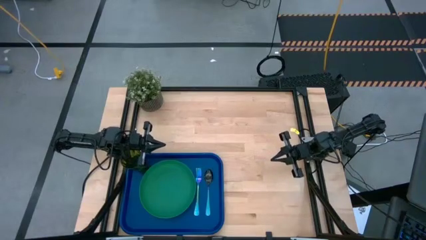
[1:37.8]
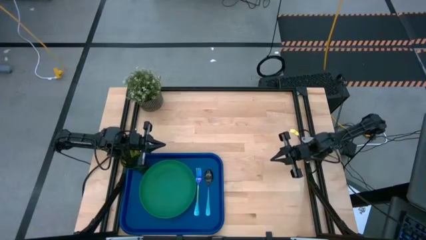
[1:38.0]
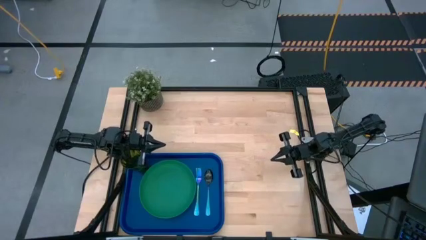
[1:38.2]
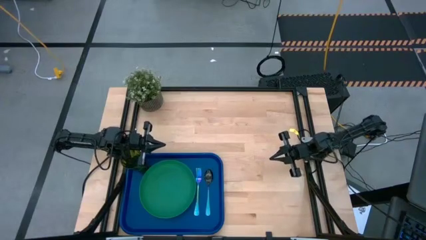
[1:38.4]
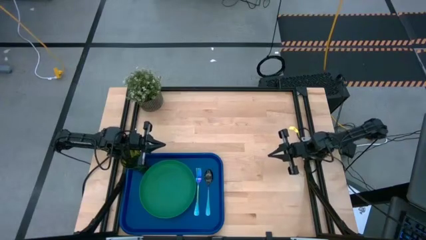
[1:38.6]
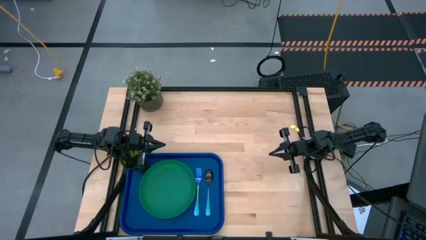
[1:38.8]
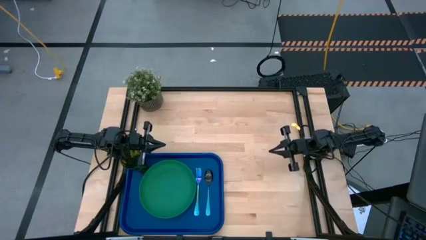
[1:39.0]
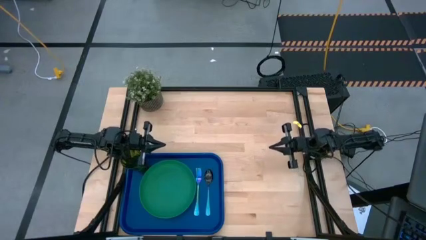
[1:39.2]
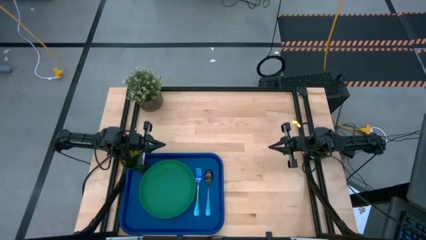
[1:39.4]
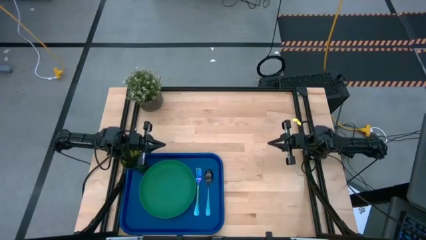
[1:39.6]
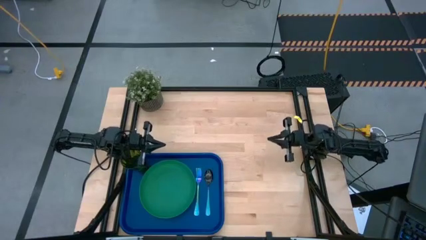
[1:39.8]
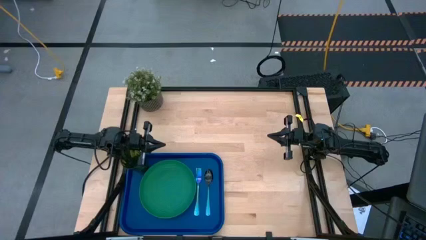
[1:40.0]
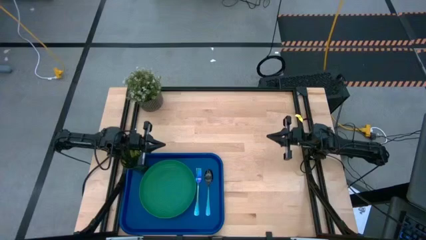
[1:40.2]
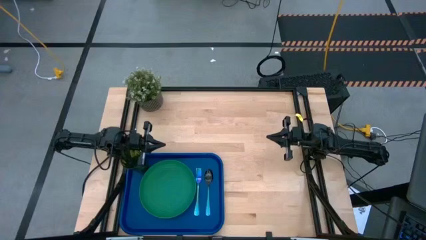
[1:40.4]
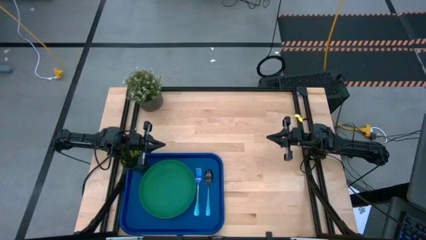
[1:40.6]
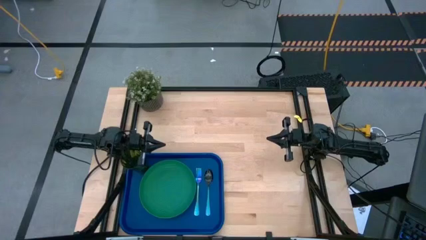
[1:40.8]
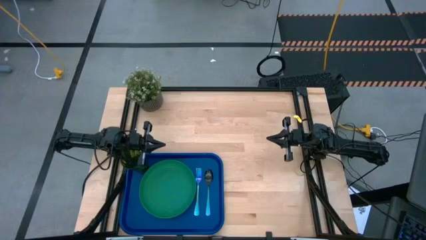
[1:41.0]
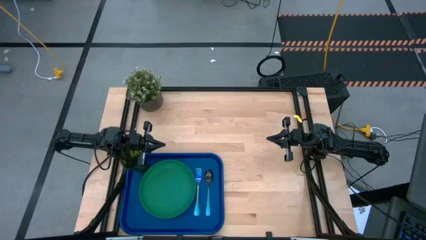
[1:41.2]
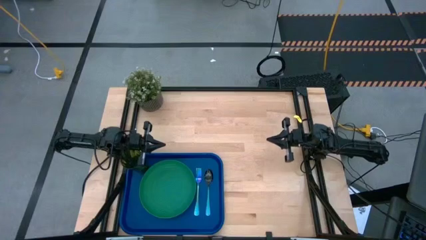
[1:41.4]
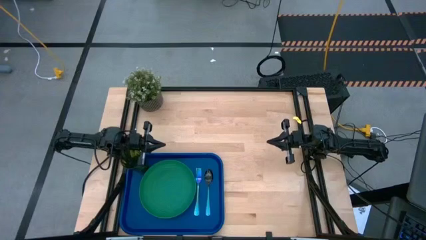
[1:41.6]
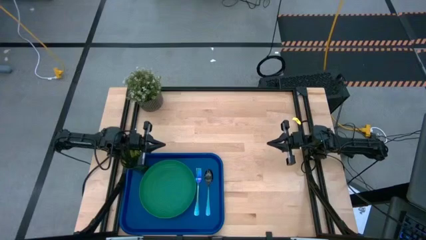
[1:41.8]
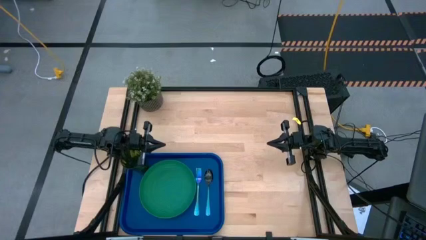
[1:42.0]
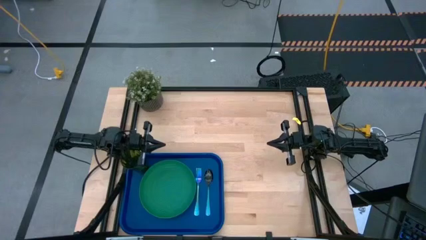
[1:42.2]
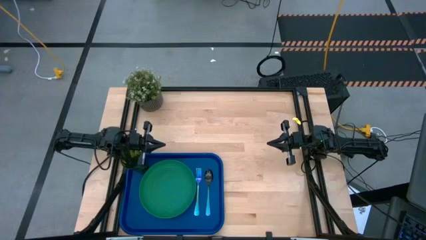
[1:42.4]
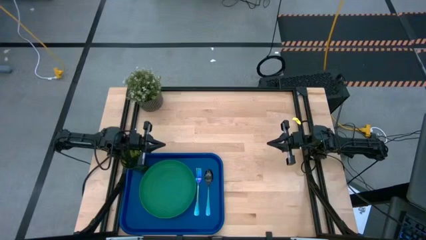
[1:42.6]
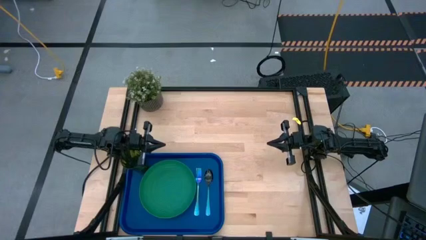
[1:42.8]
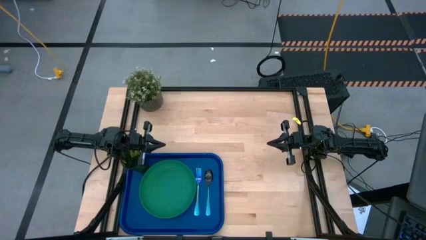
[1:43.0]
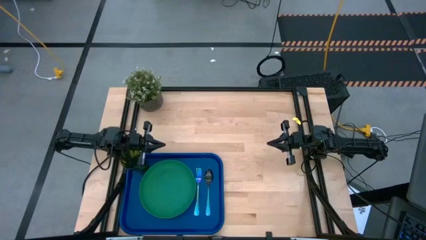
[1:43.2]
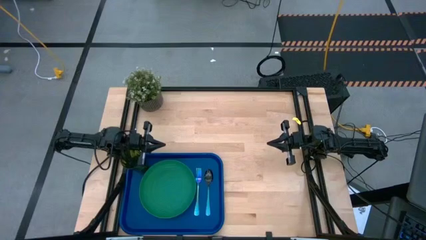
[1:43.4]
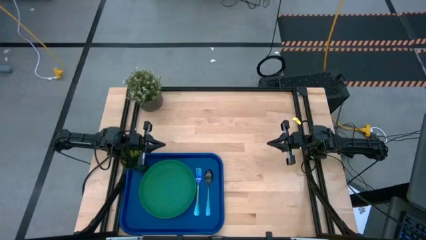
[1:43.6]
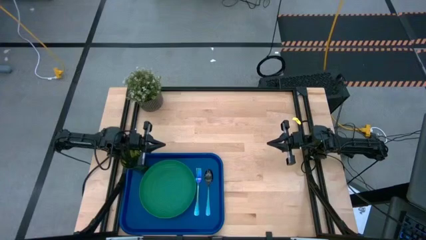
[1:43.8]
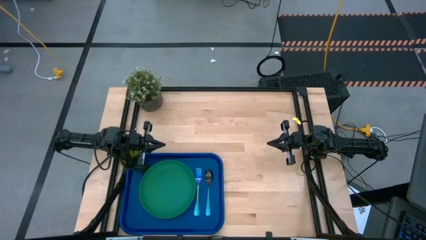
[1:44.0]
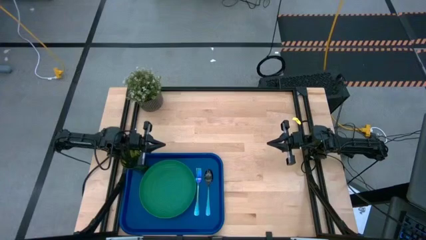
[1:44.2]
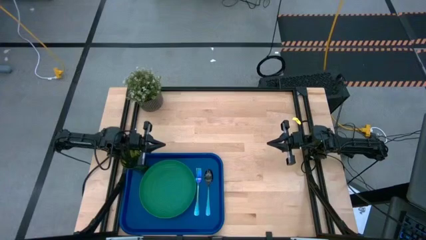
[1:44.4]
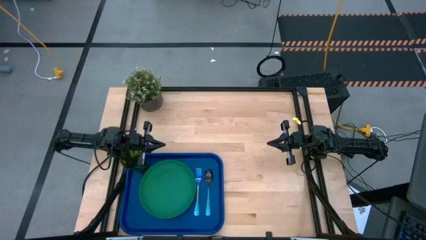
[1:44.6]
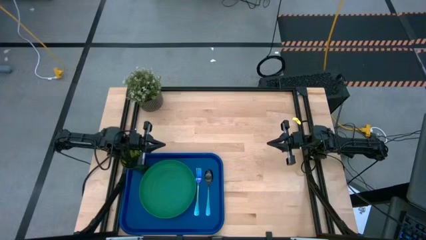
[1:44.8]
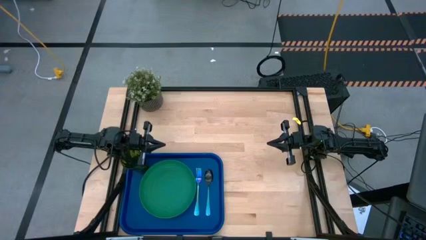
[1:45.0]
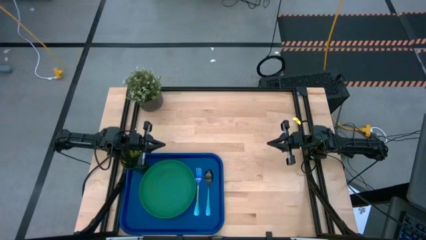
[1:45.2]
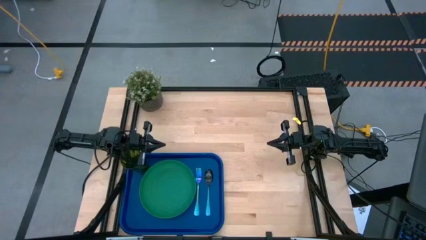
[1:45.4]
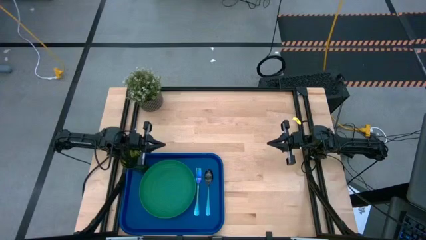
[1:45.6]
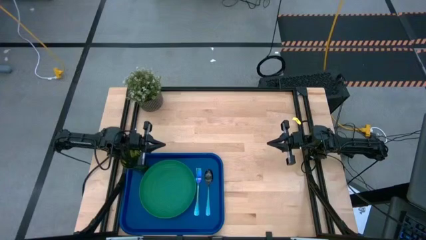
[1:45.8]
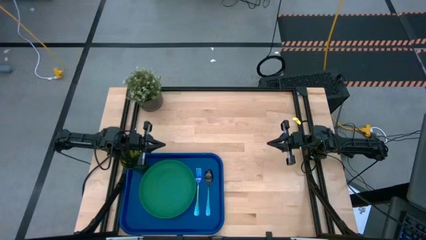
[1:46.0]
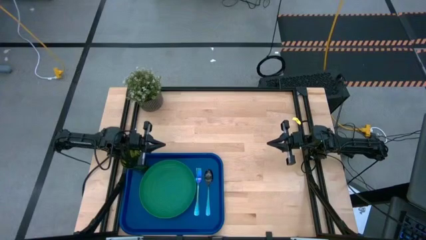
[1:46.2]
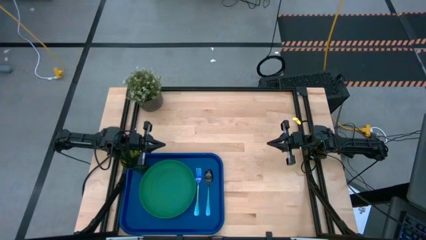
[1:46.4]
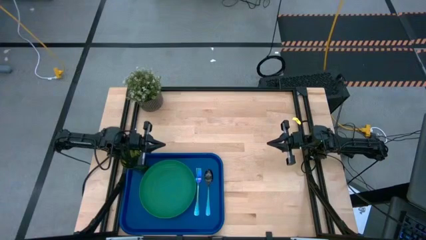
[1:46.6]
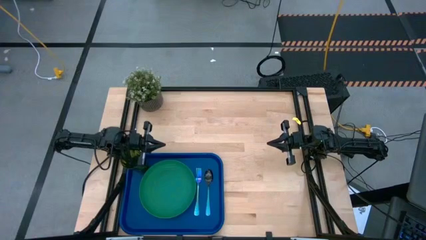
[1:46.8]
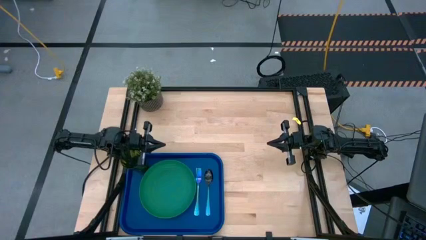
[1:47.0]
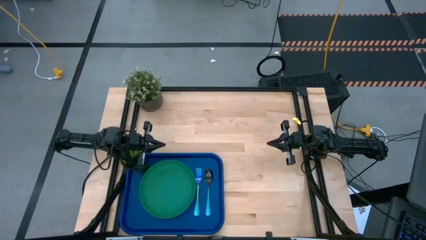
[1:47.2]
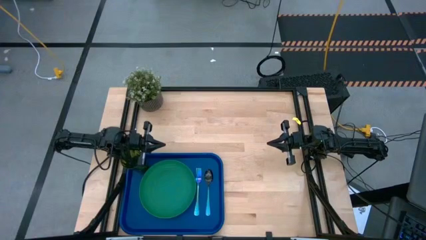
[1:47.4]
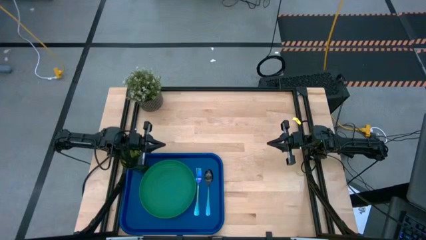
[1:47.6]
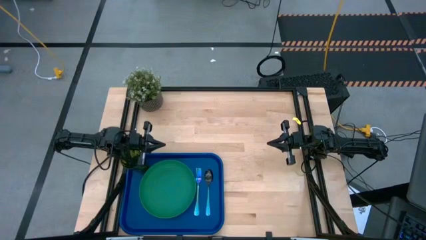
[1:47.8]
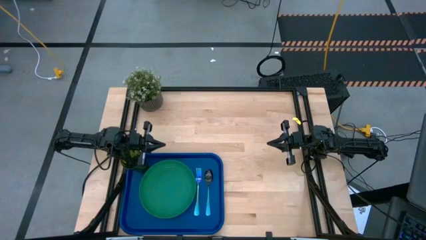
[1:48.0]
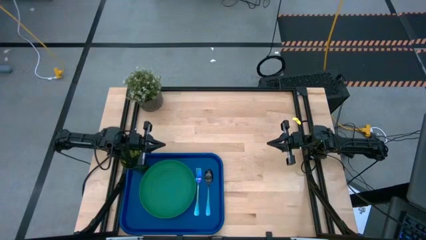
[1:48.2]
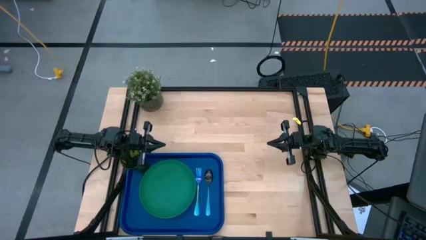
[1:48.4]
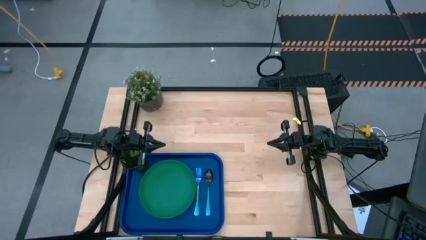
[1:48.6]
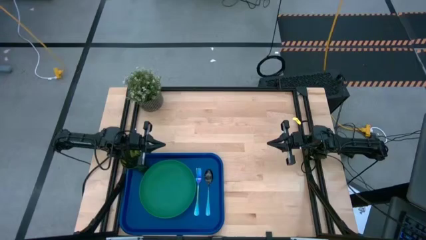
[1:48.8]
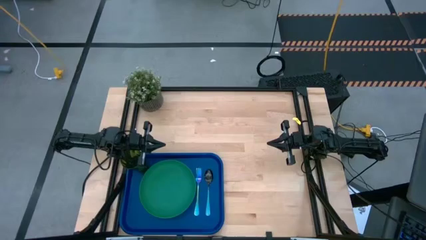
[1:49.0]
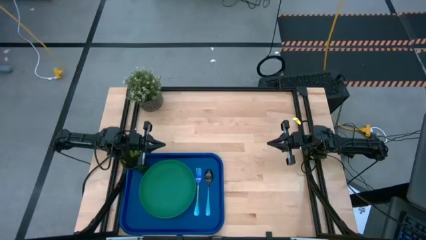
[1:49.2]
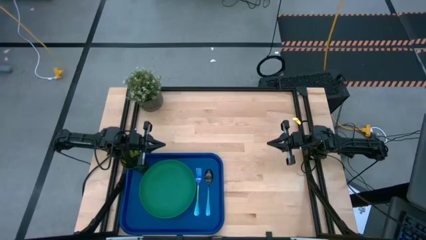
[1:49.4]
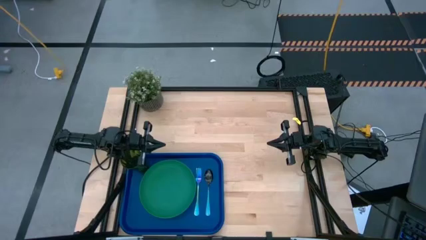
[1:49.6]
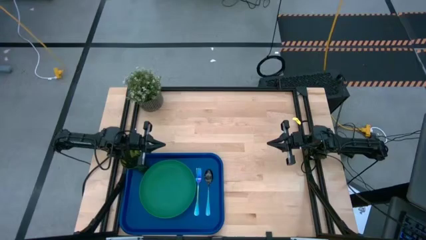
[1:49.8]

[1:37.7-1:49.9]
Task: Pick and place plate/cup/fork/spoon on tray
Return to Home Position

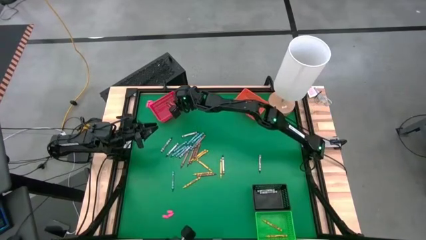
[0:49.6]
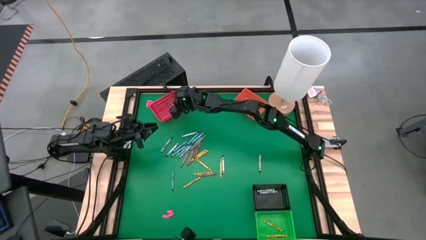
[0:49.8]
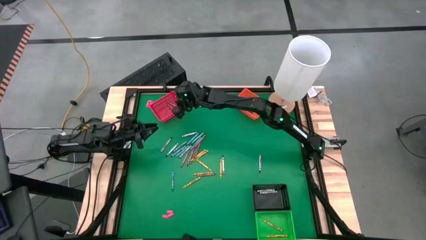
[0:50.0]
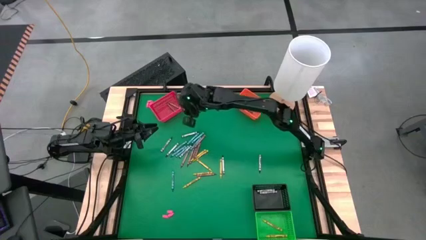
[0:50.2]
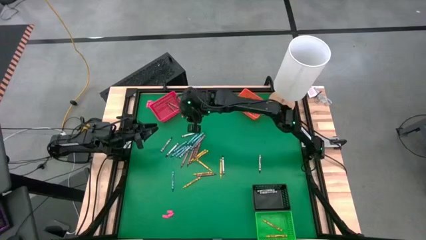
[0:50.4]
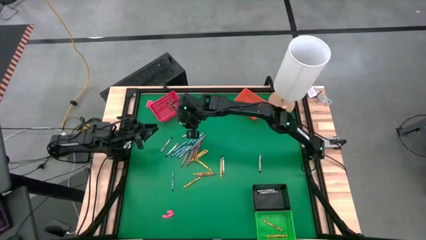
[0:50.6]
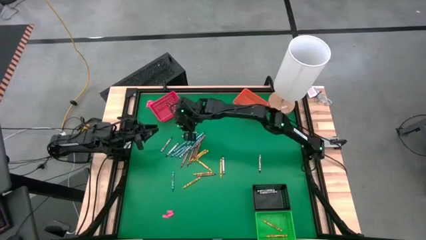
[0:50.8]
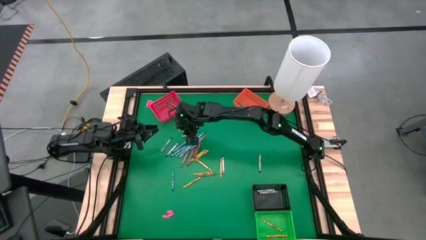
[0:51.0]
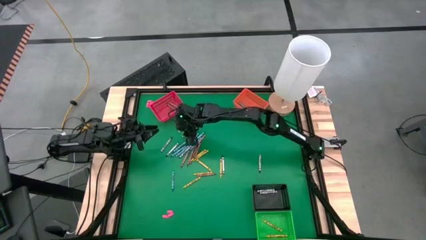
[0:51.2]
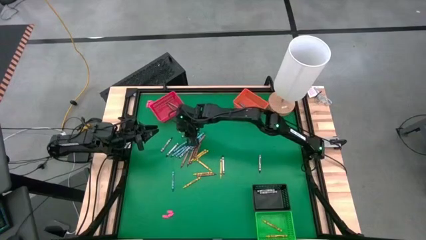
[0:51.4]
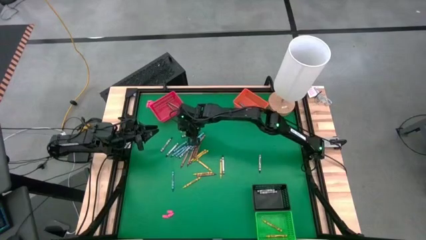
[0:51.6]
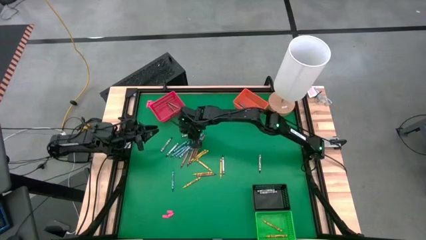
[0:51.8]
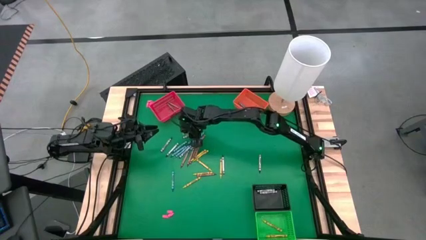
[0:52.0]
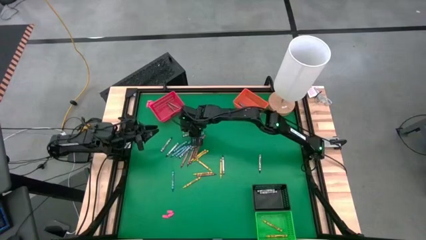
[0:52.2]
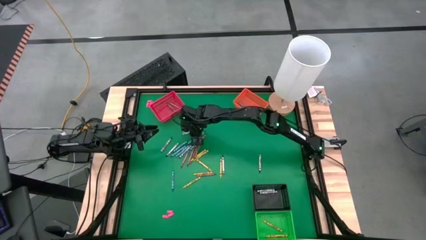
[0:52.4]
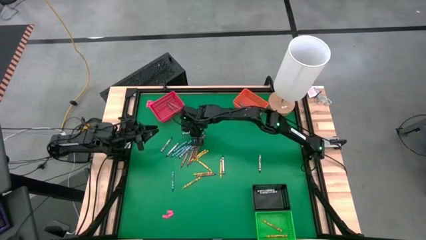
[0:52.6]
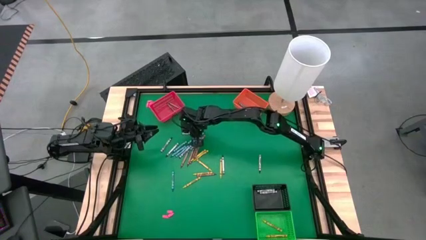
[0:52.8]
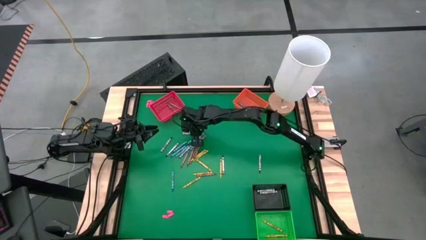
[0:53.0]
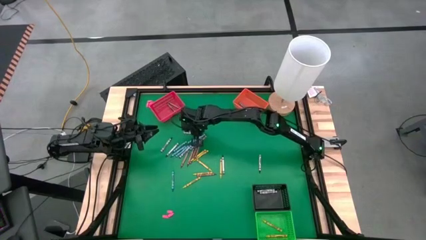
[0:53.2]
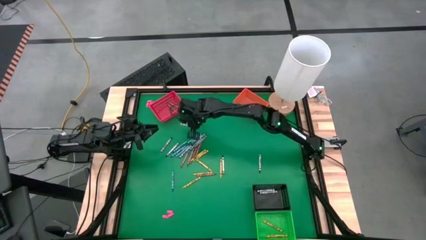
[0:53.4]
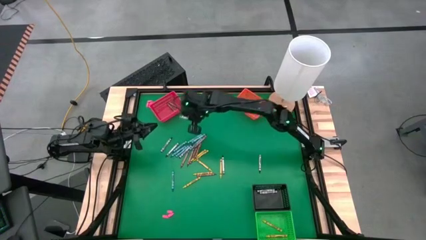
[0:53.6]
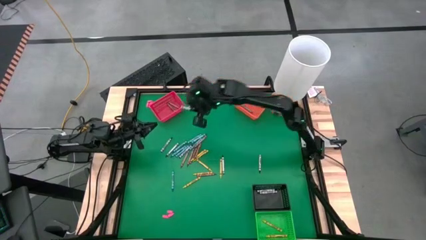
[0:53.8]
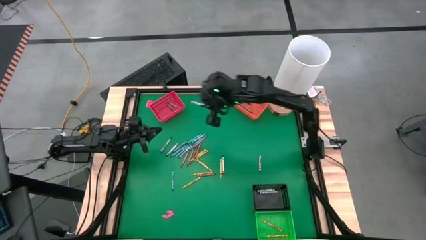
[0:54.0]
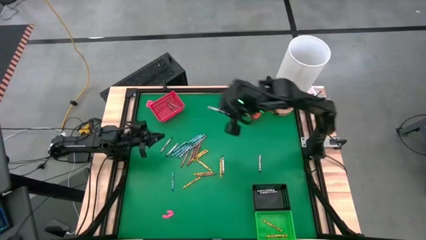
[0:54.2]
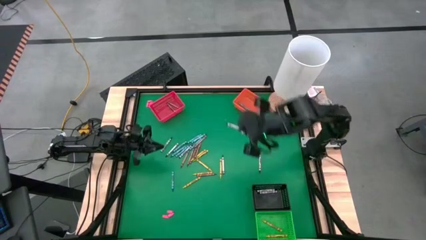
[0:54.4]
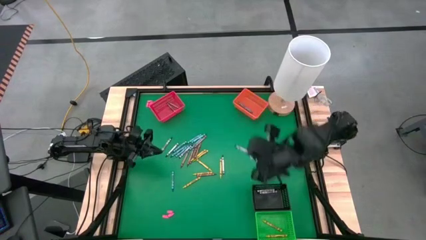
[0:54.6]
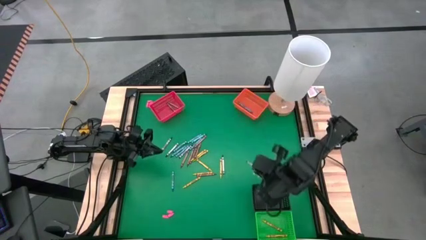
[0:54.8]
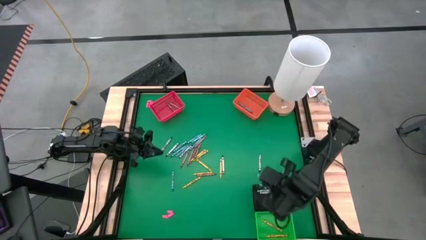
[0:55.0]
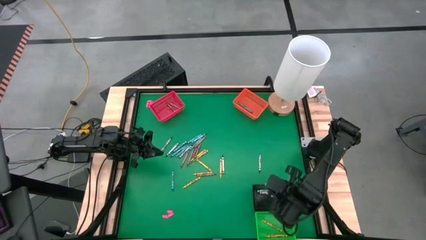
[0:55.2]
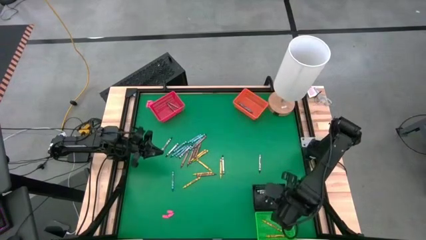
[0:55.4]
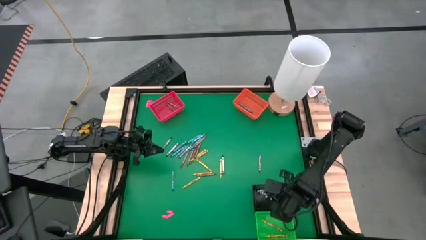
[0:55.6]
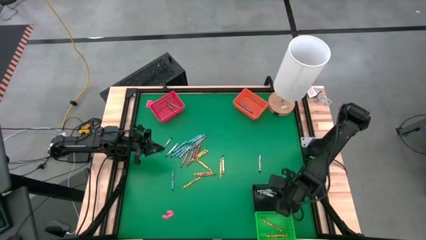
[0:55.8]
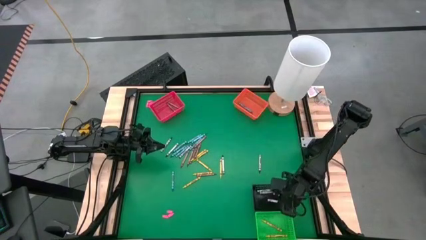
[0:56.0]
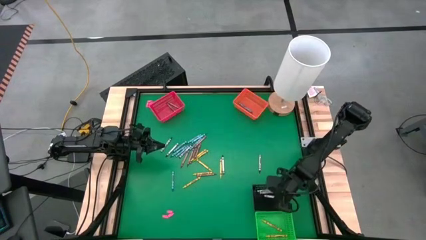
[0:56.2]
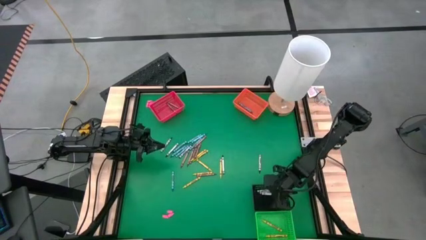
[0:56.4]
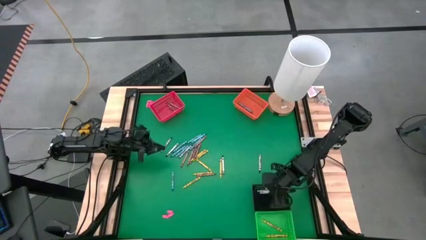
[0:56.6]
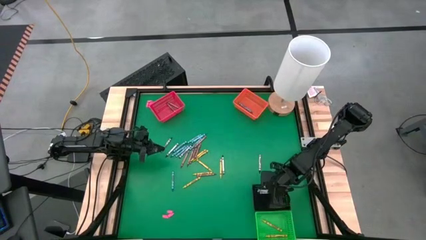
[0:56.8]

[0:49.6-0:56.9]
Task: Sort crayons
Put the black crayon into the black bin
